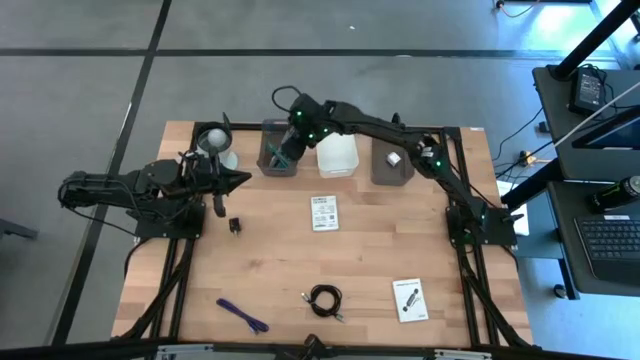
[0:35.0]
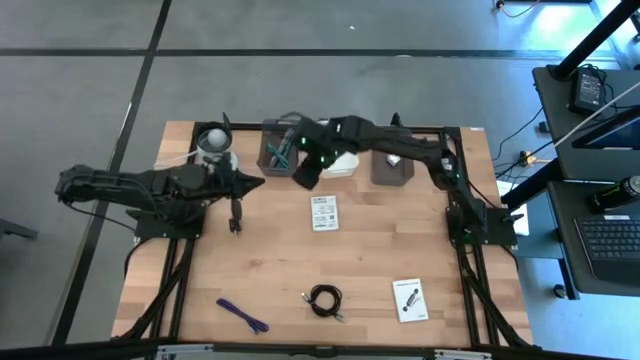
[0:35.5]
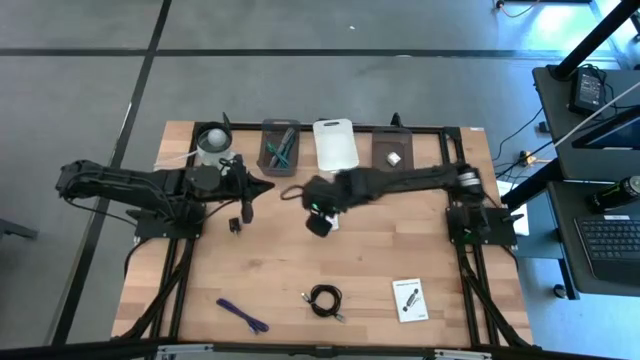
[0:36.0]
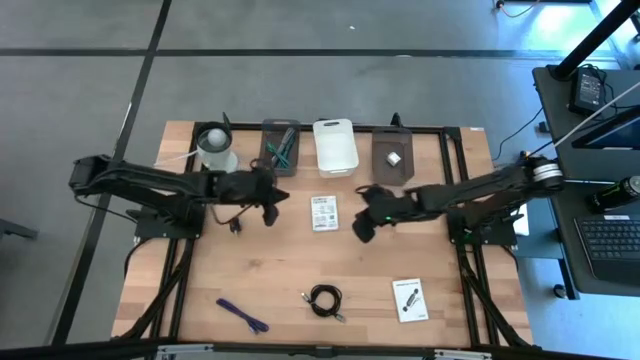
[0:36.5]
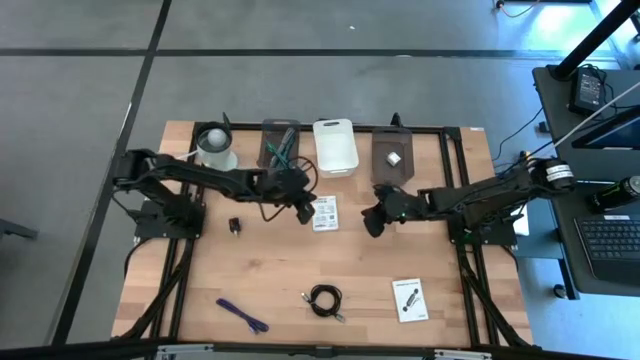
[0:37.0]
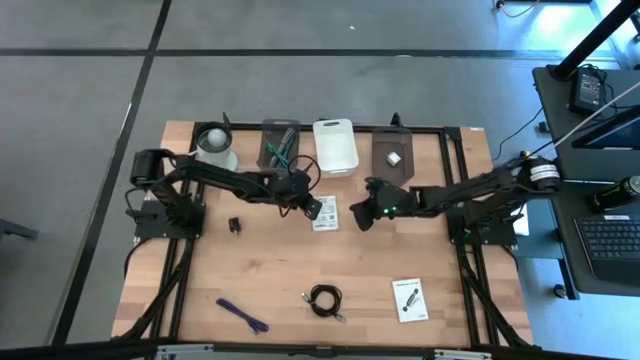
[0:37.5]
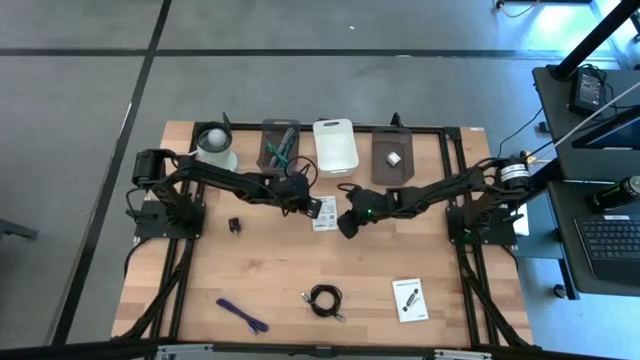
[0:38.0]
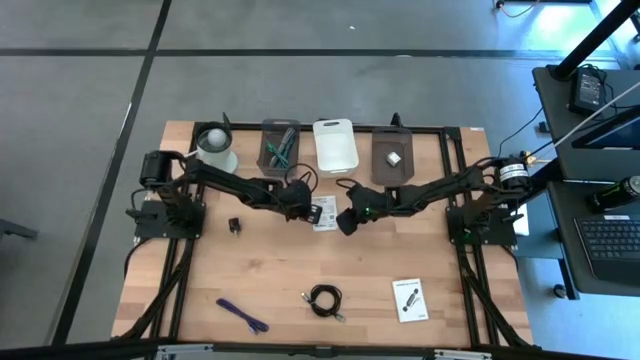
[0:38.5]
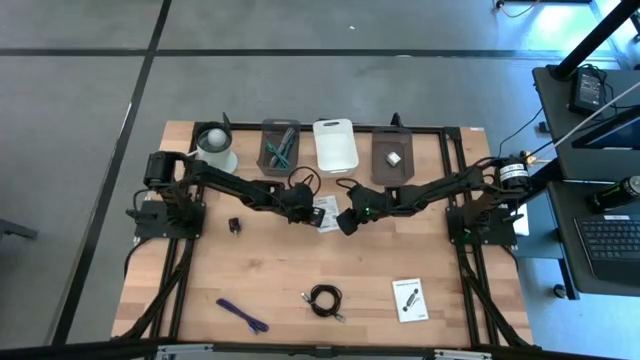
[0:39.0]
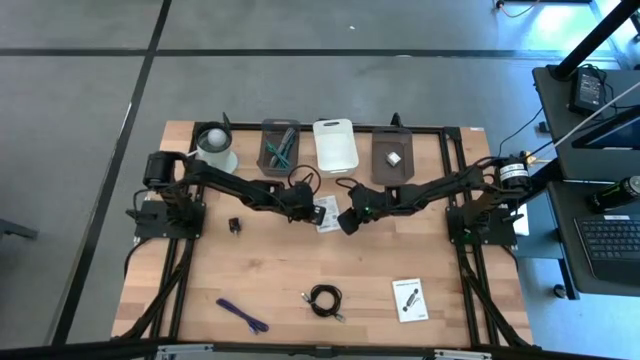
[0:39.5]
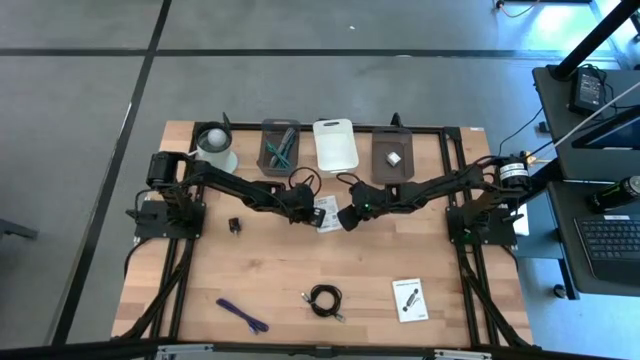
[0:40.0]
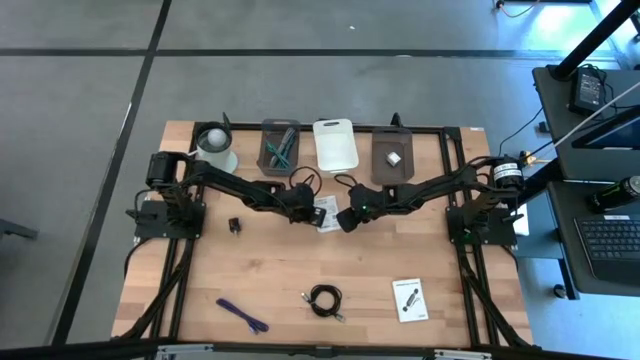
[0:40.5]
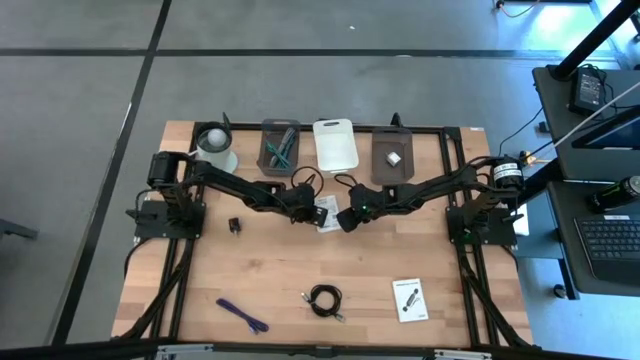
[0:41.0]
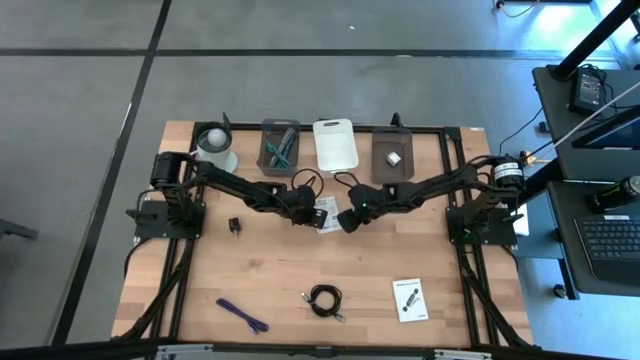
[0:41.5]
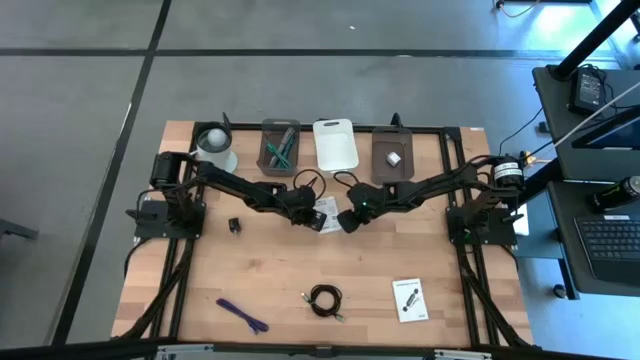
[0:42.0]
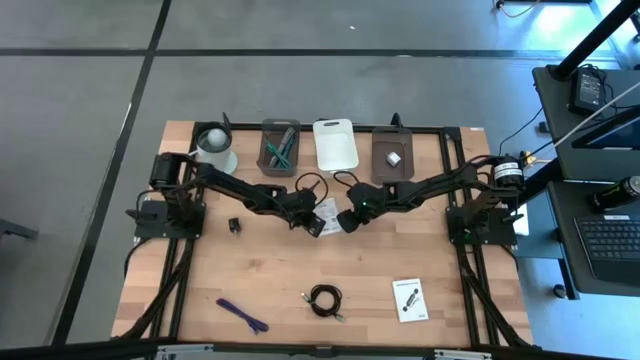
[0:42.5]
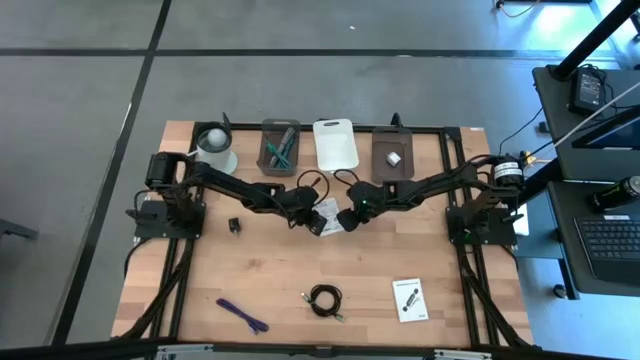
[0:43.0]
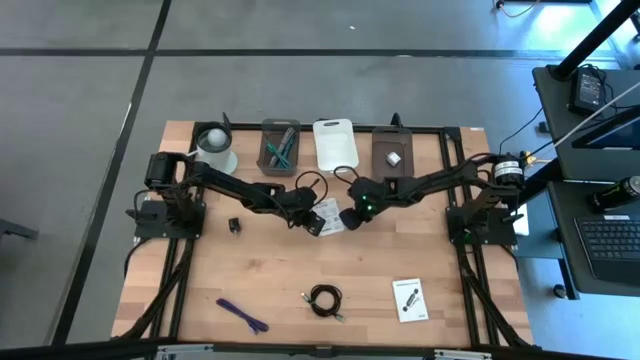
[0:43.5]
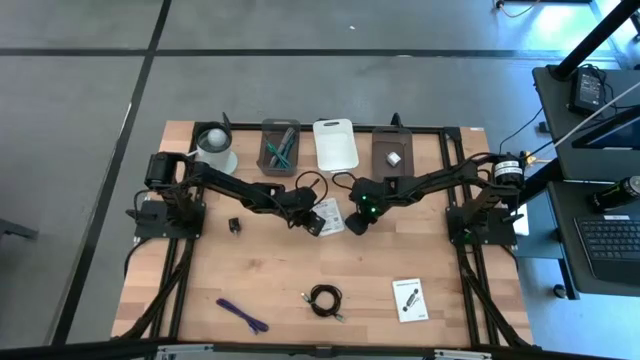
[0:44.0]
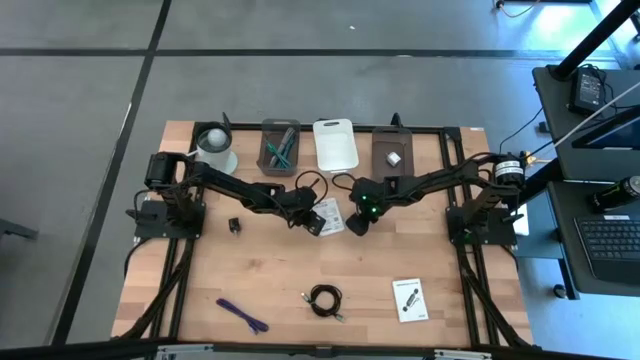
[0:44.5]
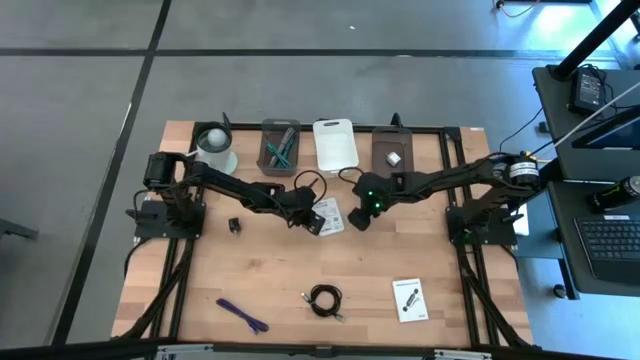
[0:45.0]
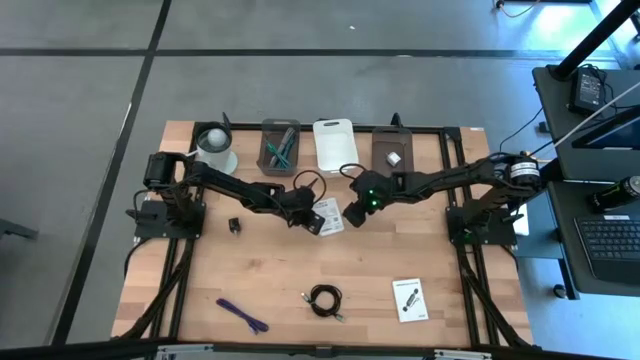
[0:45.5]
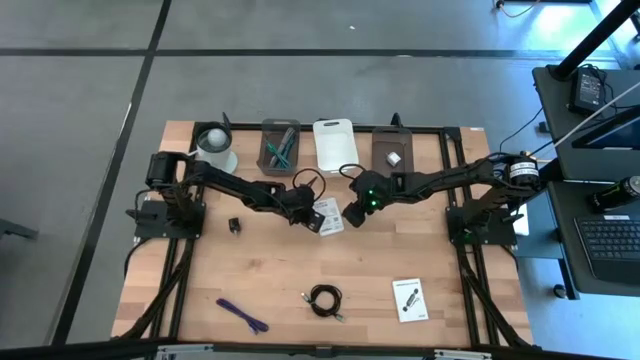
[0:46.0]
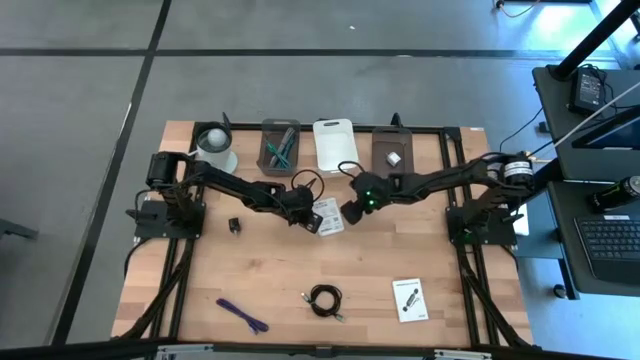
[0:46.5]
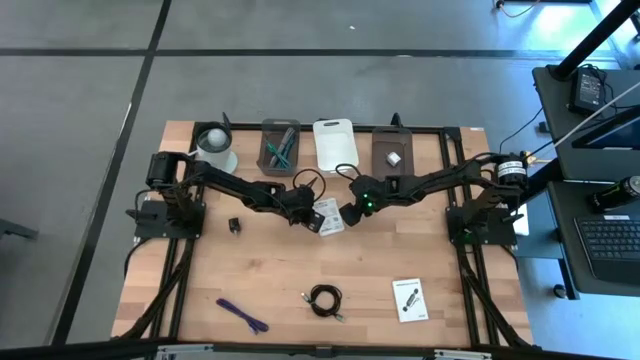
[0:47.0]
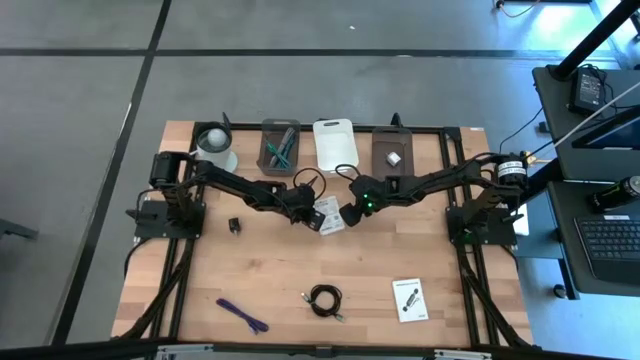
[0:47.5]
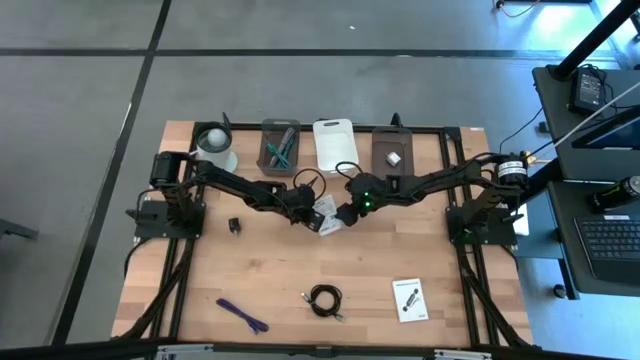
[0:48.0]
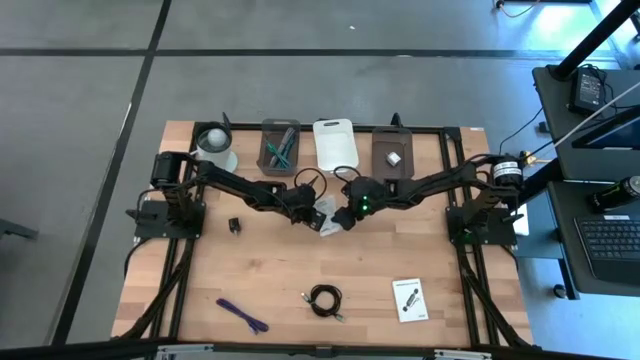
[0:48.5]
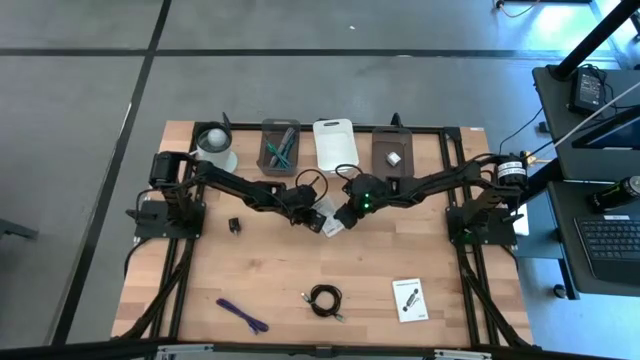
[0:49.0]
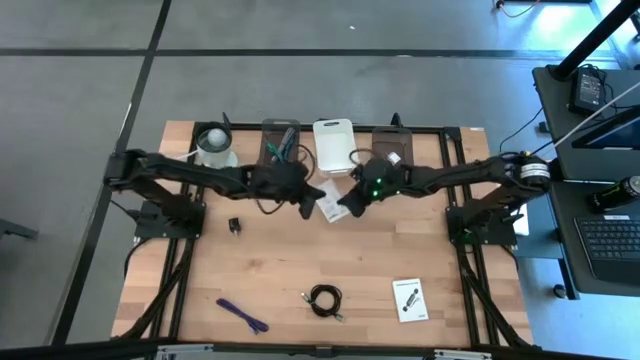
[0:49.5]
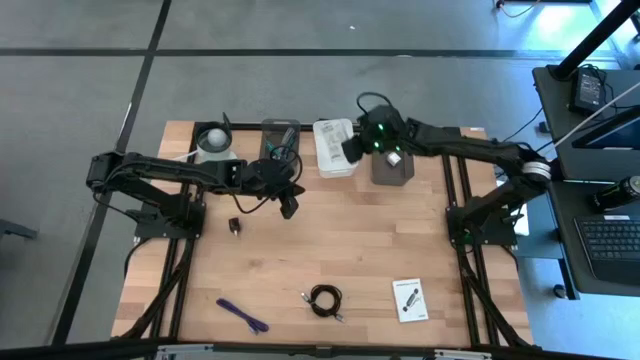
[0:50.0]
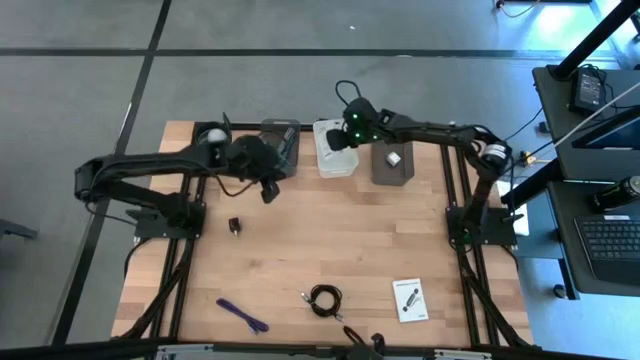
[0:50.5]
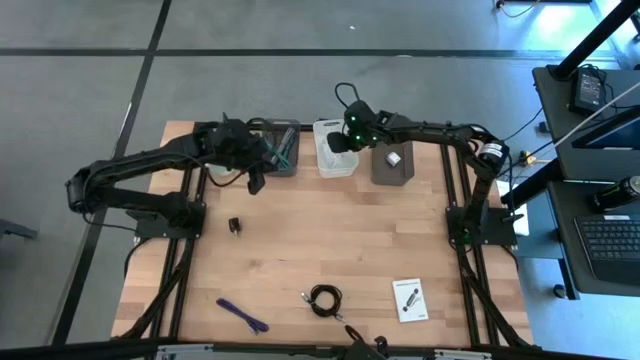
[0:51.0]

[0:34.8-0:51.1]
Task: Pick and place items into bin
Put the top white card reader box into the white bin

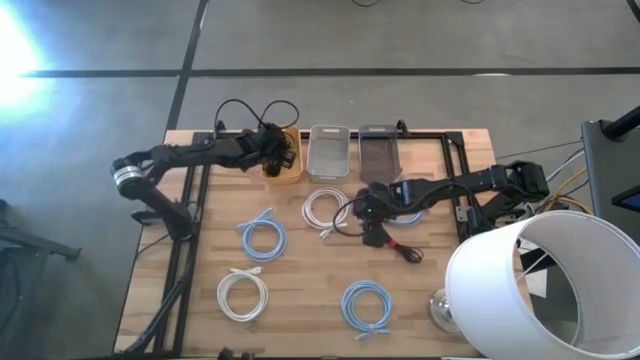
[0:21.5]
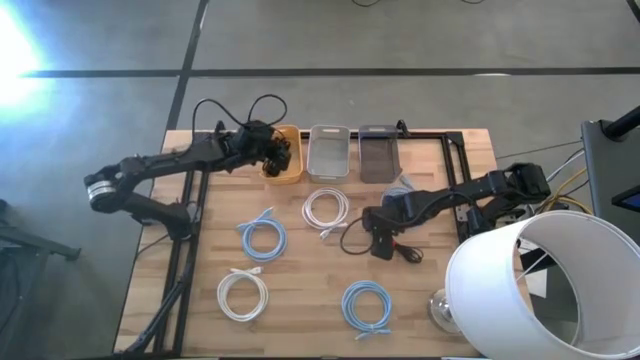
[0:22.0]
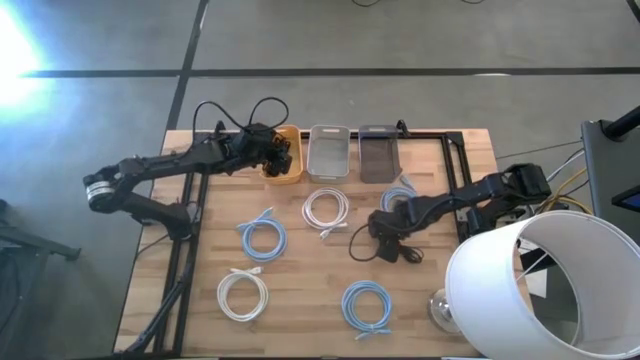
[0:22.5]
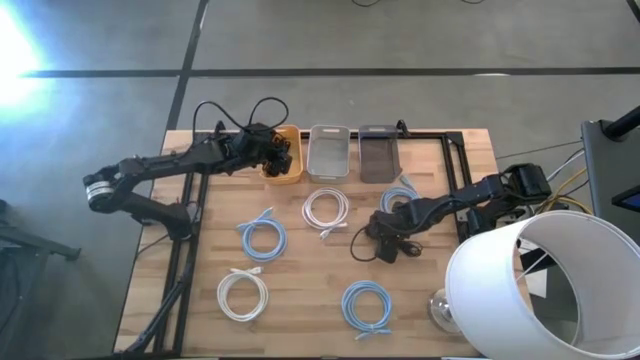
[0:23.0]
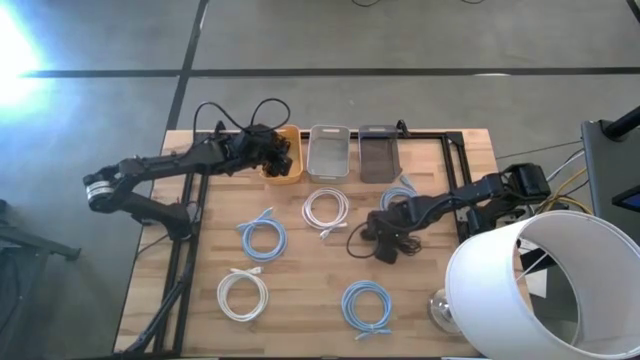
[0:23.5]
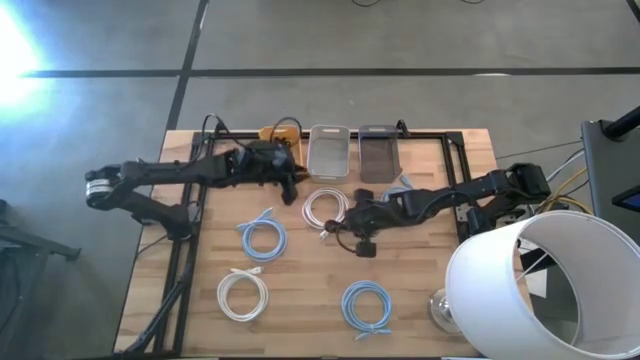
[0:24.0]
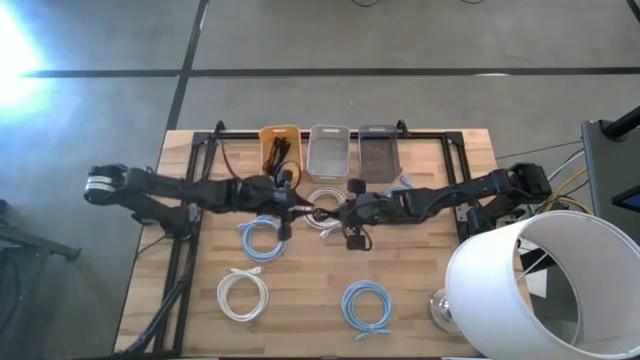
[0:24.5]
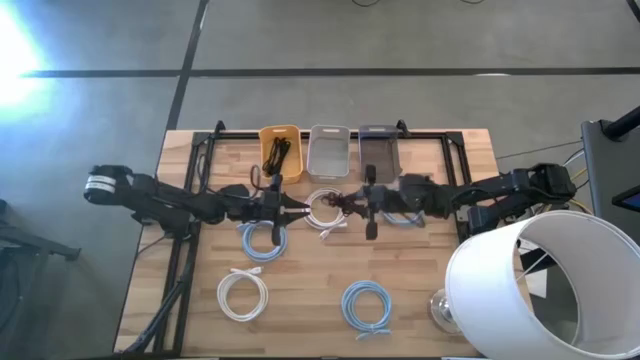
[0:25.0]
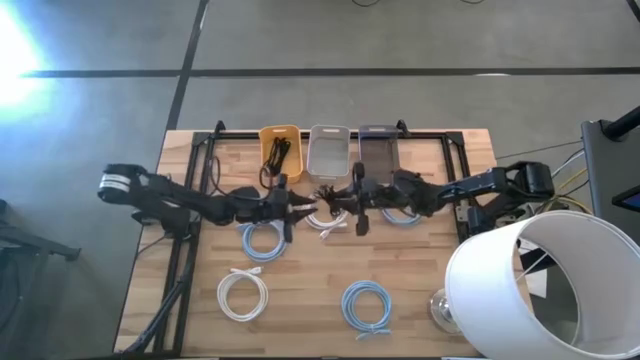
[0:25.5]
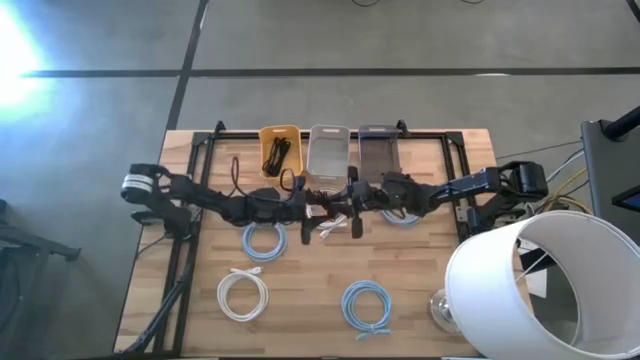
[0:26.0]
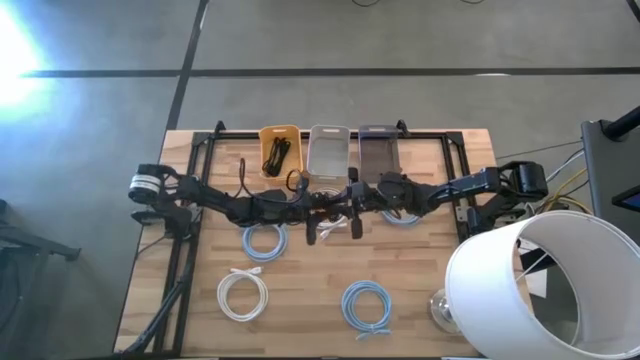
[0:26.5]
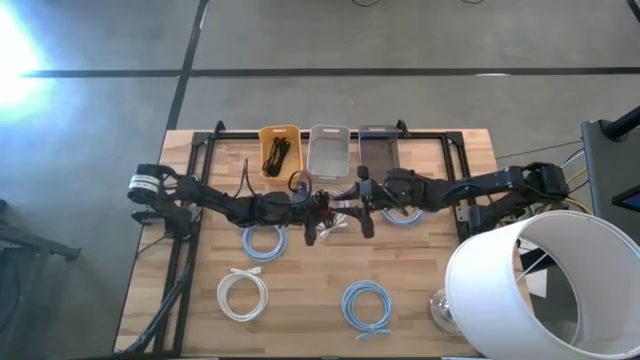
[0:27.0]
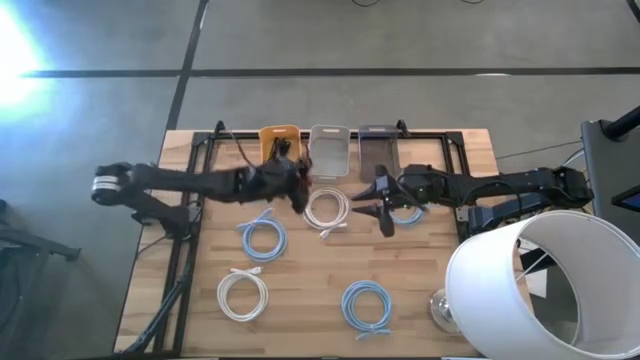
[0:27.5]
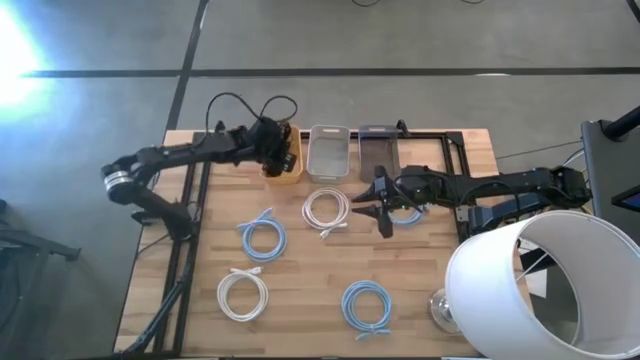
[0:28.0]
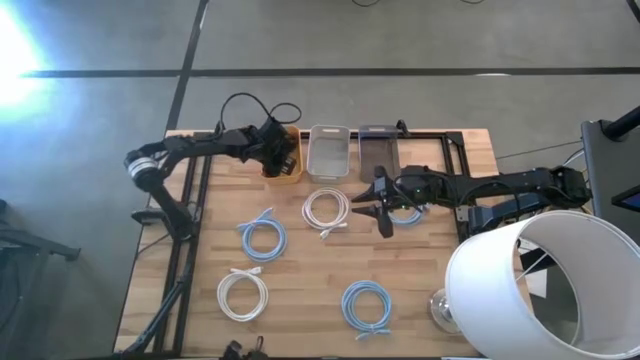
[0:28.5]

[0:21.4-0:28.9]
Task: Pick & Place USB Port
Put the black charger cable into the yellow bin
